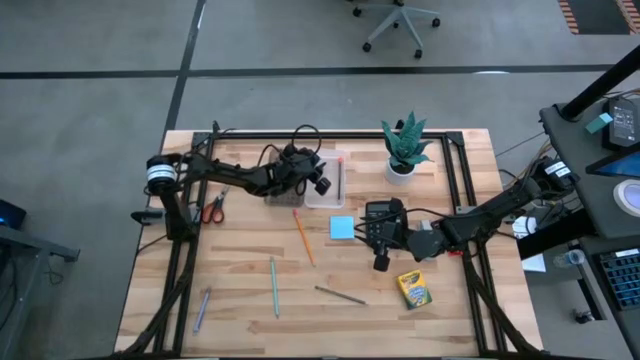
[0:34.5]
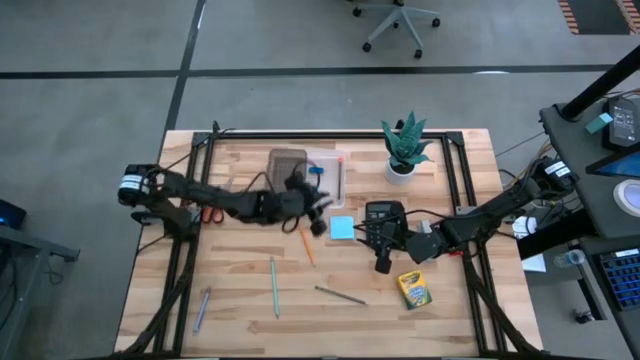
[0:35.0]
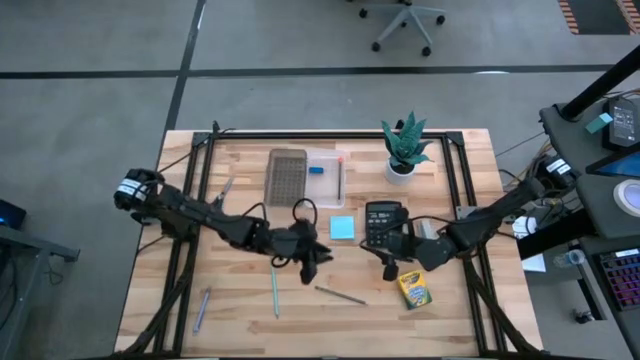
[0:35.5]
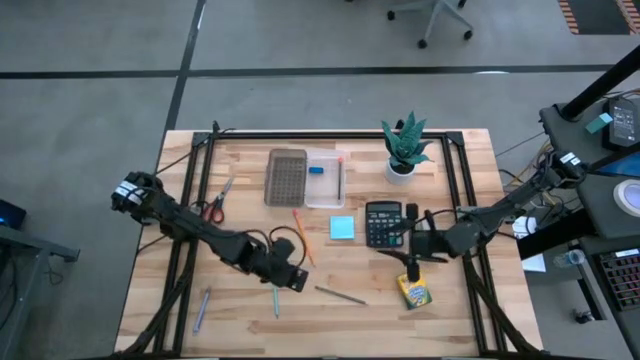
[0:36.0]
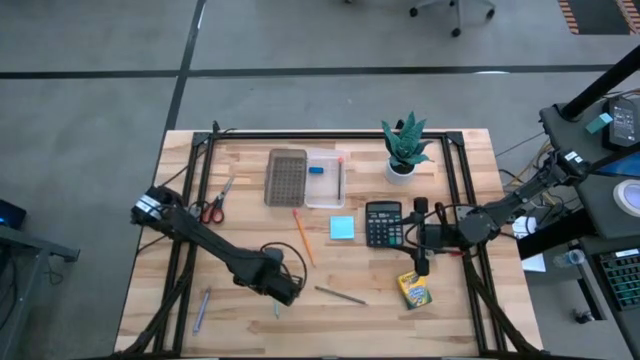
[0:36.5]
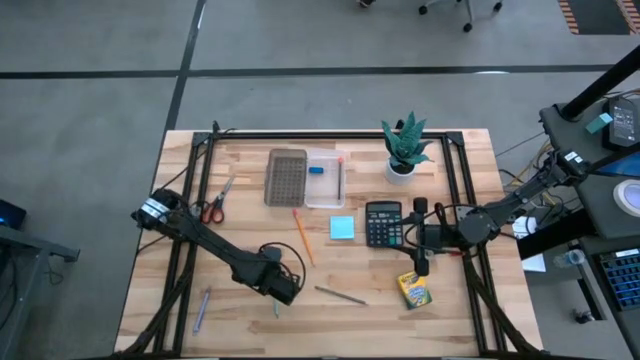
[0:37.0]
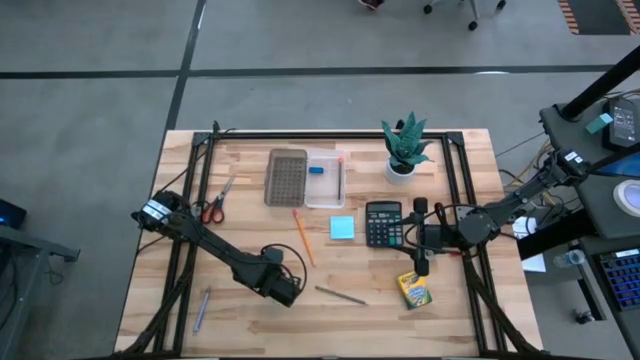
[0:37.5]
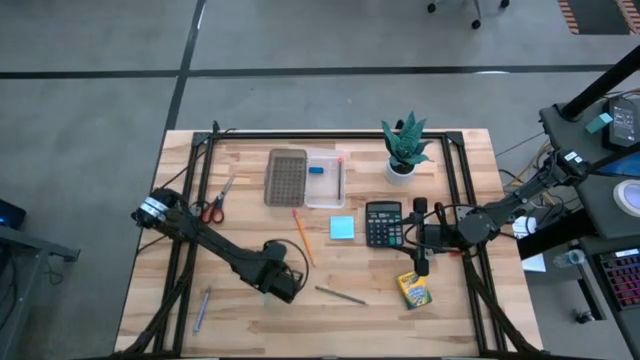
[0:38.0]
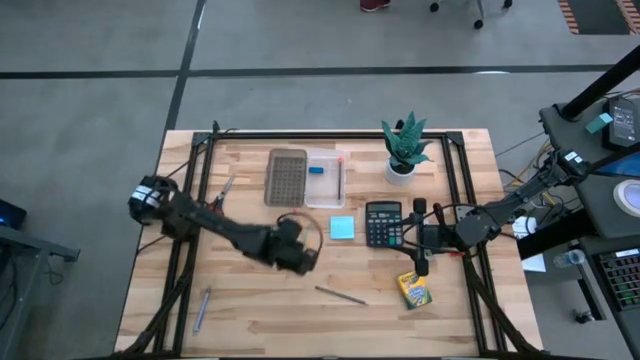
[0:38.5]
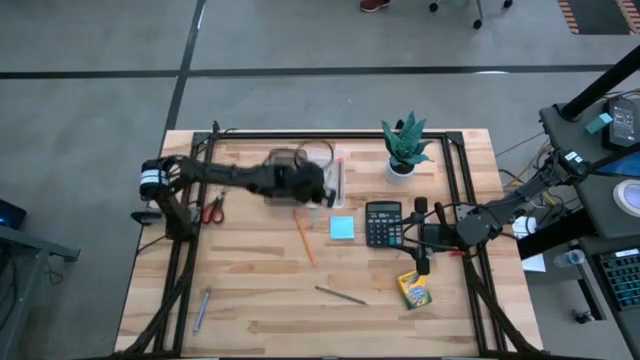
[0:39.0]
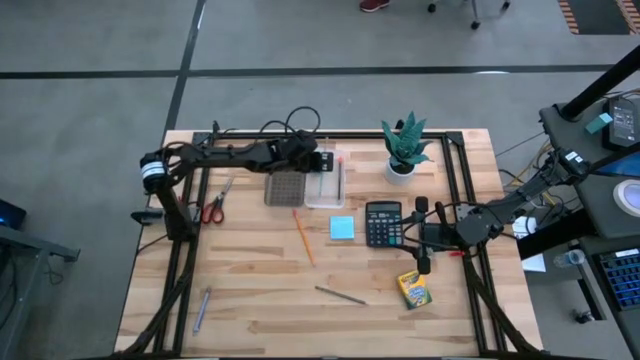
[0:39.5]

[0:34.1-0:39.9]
Task: Pack school essentials
Put the light blue pencil into the transparent supply box

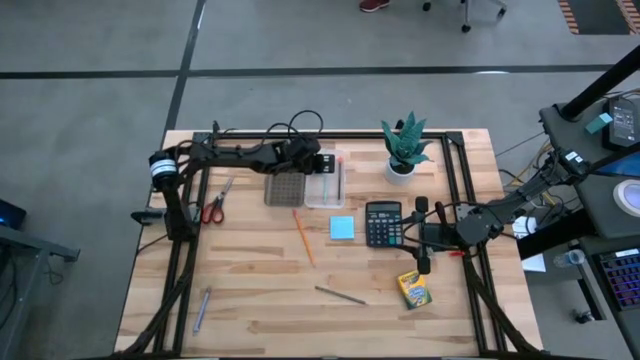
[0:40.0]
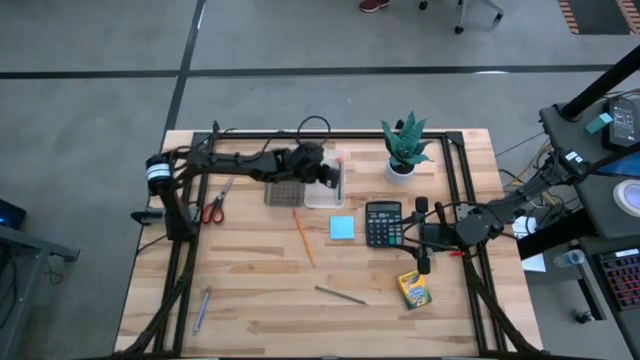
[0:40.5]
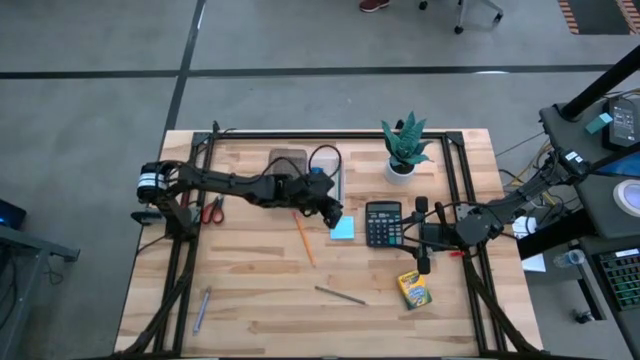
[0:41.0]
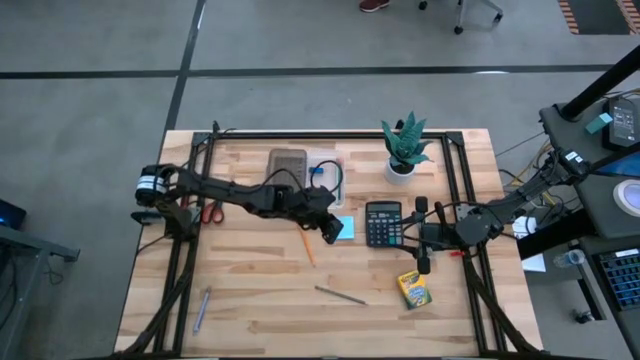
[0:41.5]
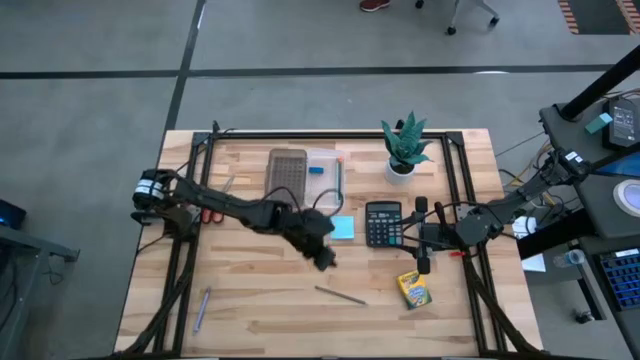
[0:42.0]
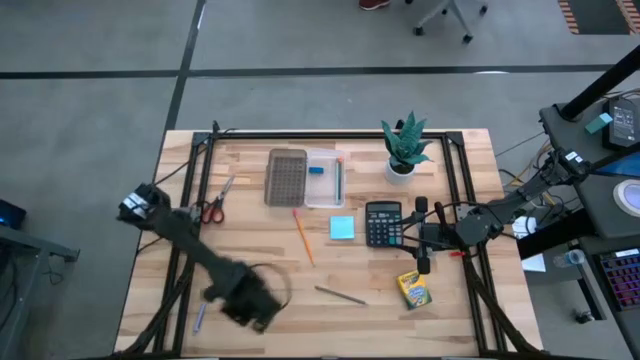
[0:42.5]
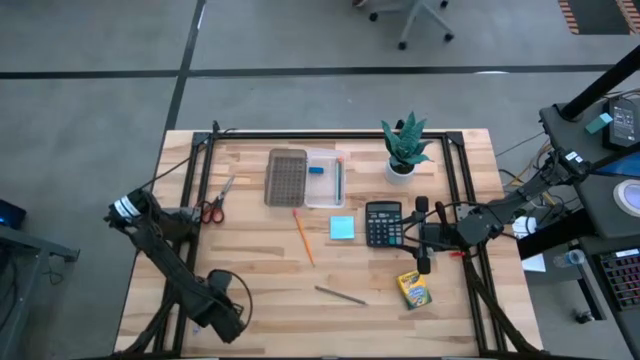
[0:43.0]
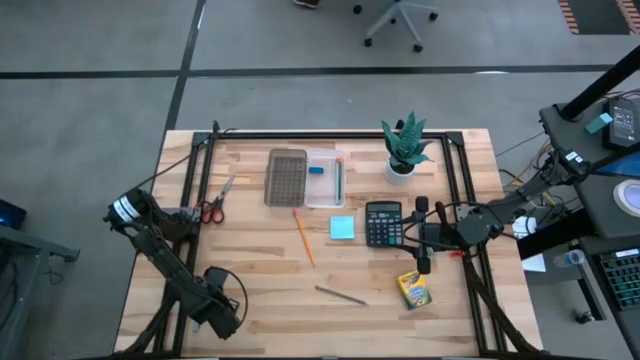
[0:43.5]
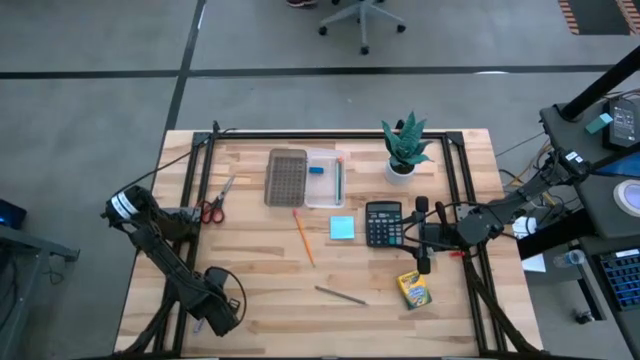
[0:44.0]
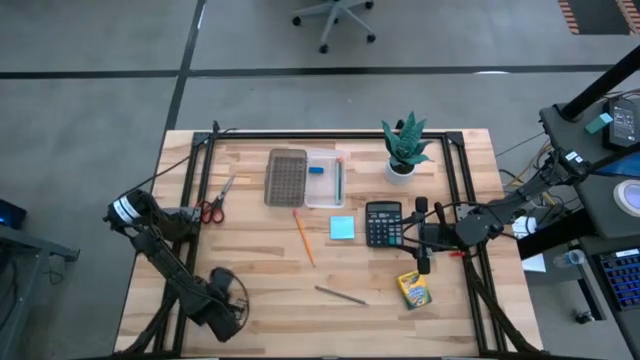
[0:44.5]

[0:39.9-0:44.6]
Put the purple pen into the black supply box

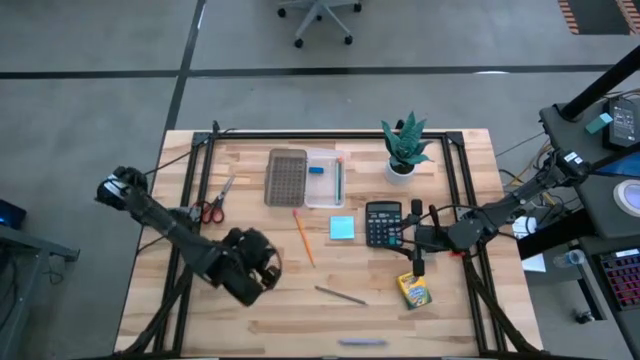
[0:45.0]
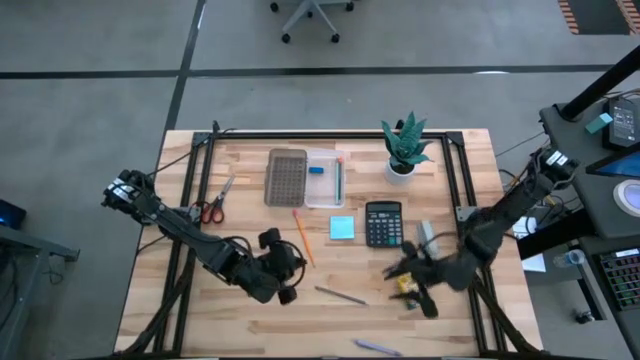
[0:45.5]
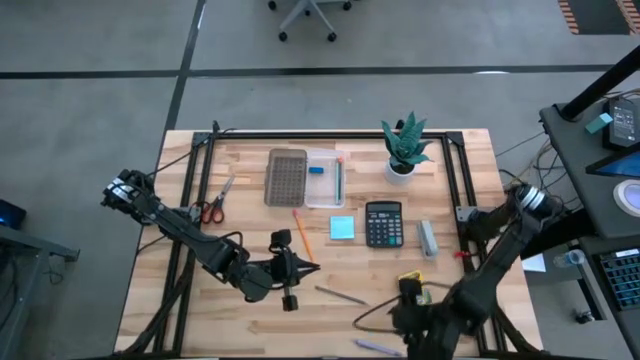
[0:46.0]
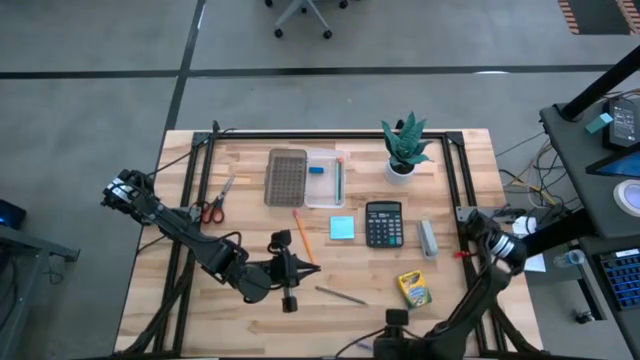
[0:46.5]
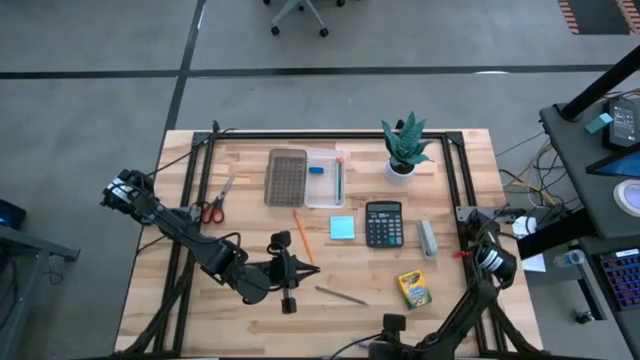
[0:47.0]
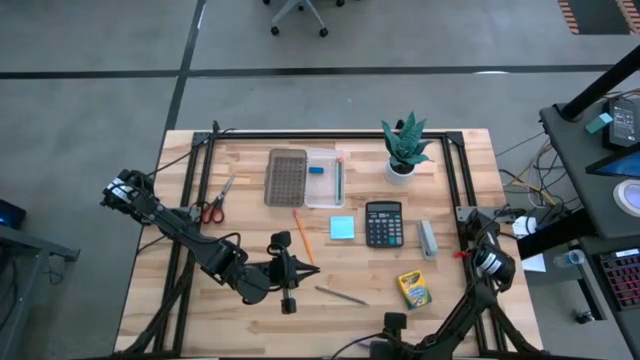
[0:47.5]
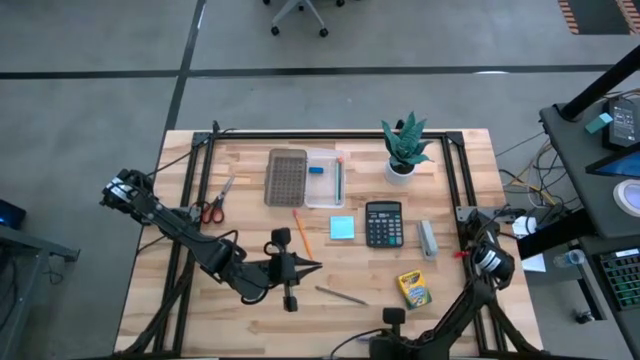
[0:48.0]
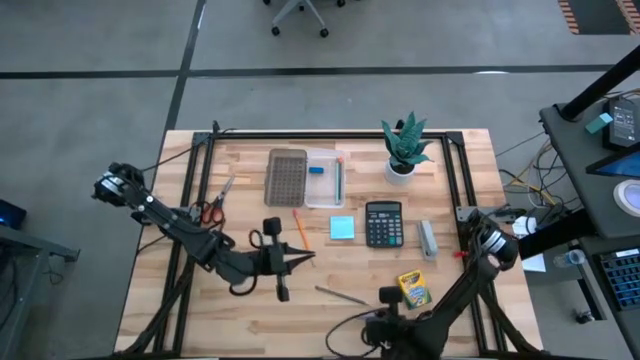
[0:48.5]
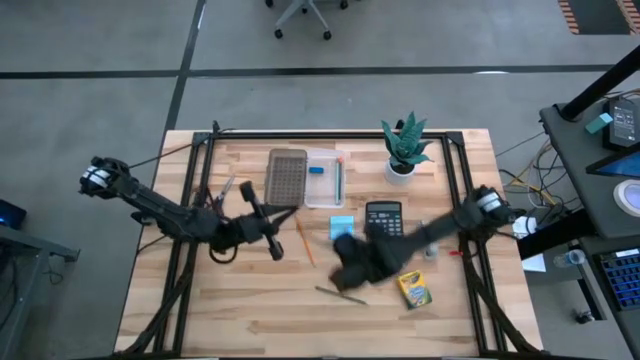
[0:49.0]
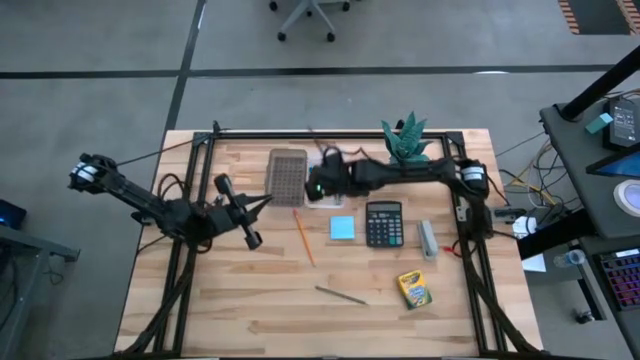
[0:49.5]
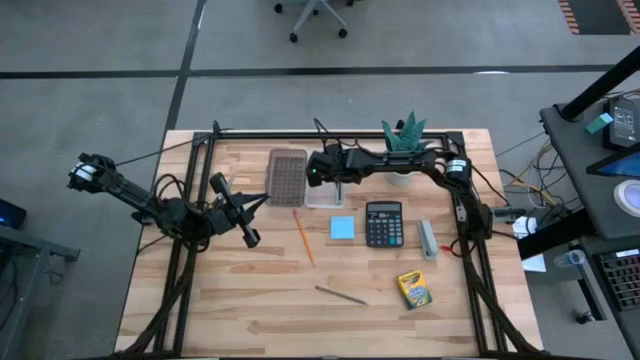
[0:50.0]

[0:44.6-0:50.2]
Put the purple pen into the transparent supply box

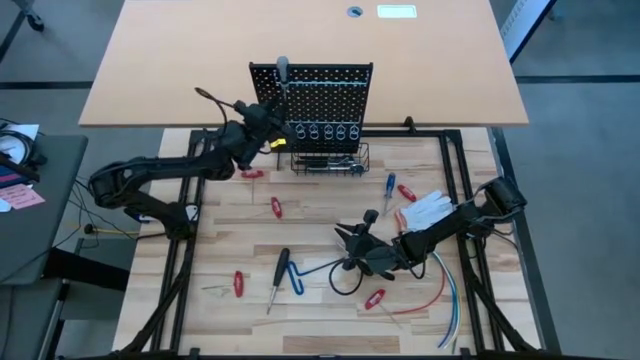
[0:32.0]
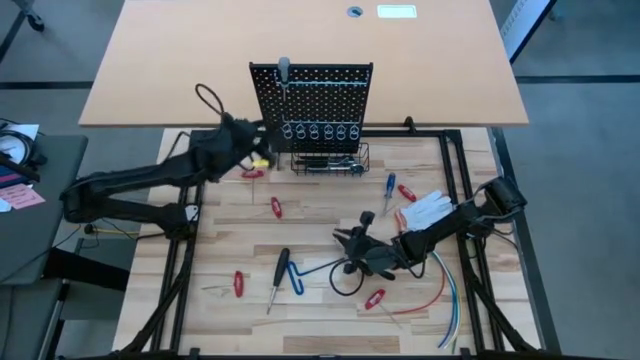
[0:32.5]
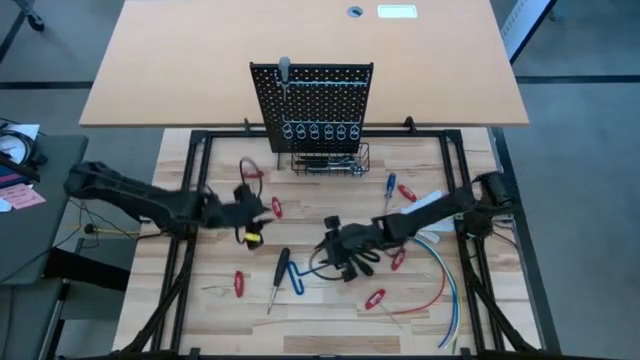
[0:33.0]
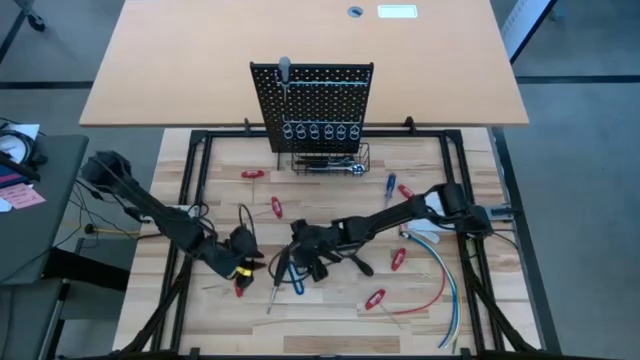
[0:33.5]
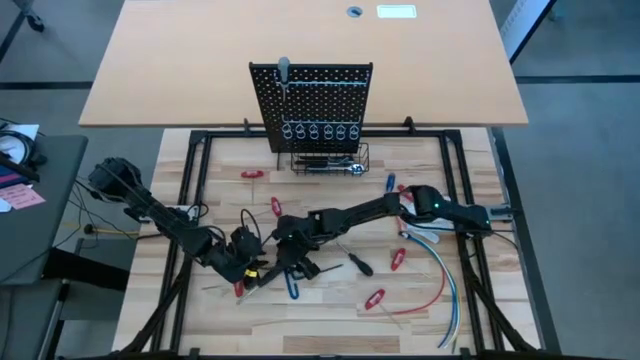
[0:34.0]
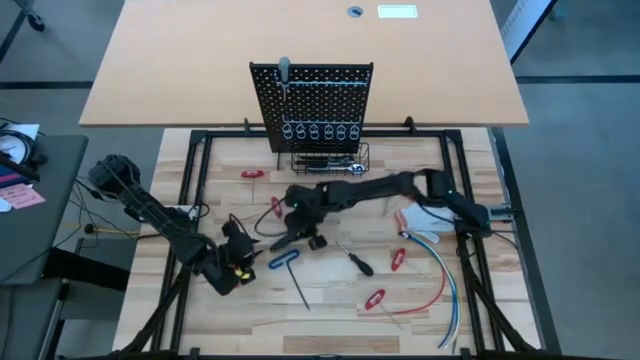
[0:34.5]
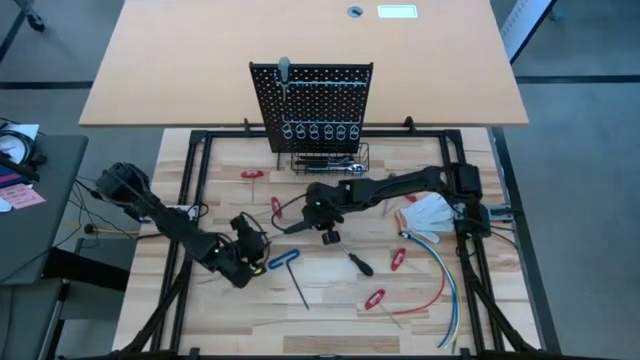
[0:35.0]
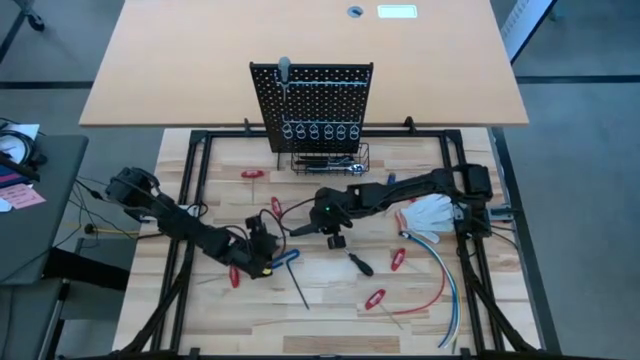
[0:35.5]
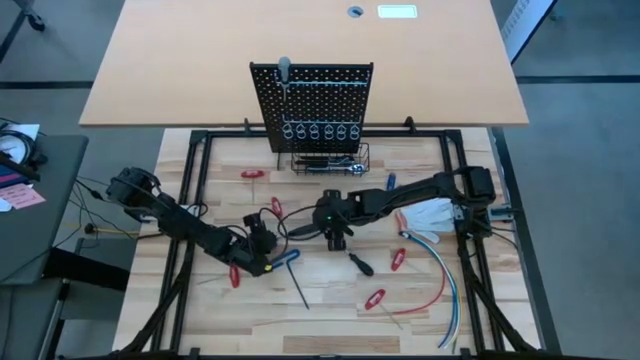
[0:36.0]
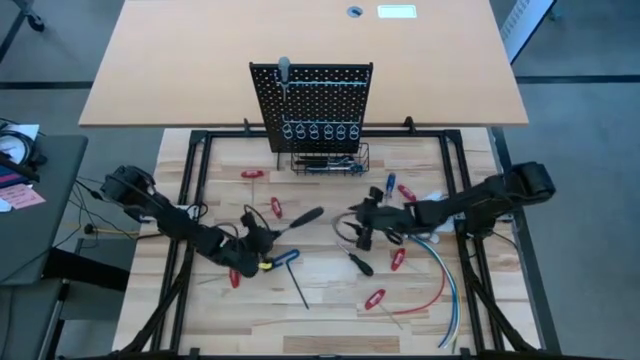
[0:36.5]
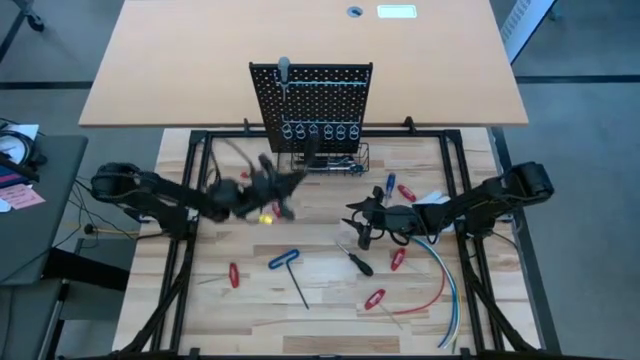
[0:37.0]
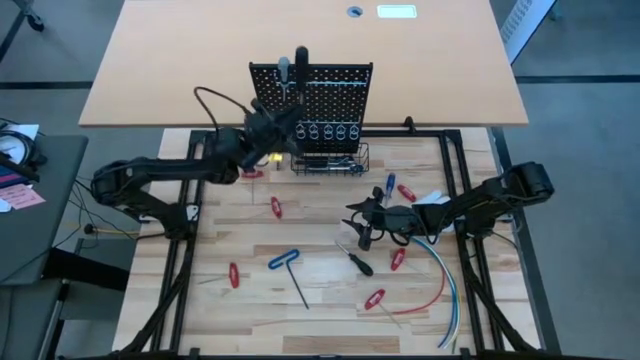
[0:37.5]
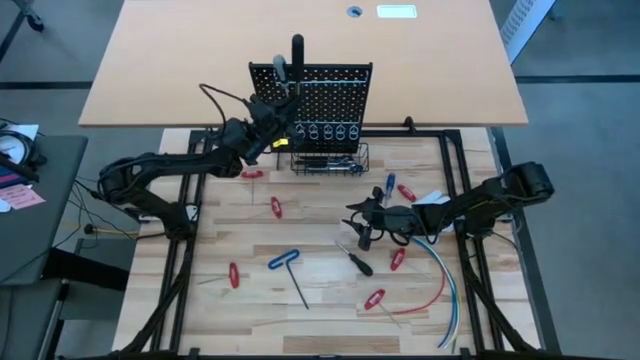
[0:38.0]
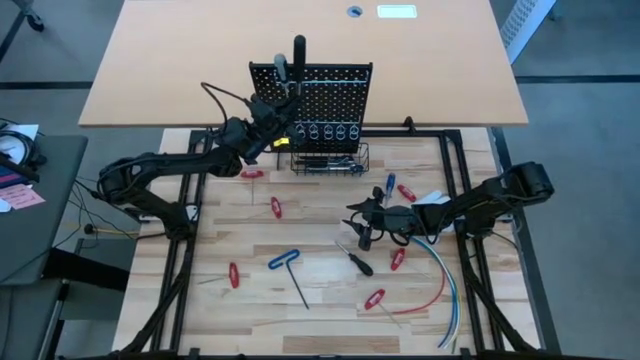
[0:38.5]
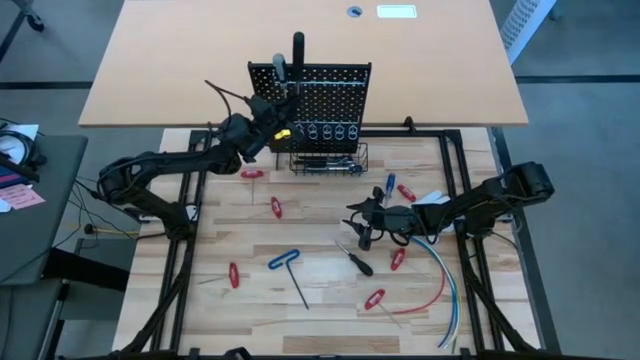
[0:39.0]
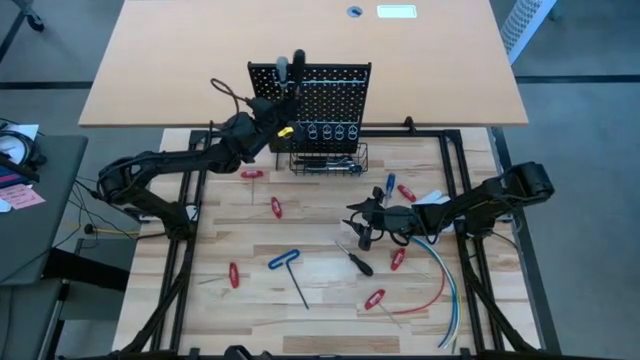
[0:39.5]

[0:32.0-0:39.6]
Task: Hang tools onto peg board
Hang the black screwdriver on the pegboard
